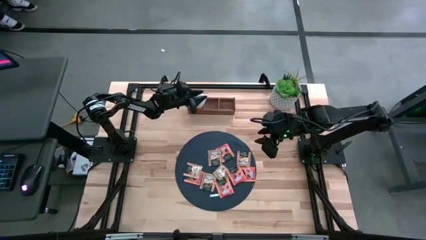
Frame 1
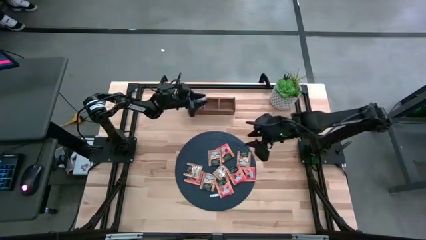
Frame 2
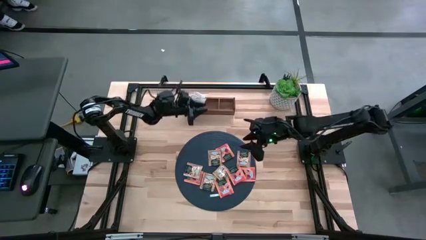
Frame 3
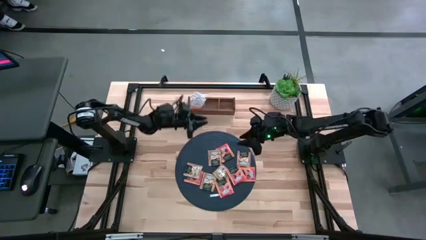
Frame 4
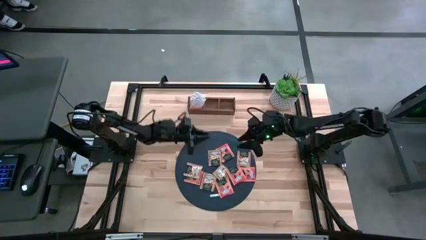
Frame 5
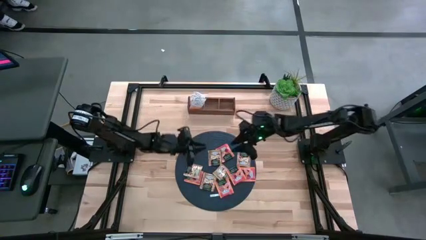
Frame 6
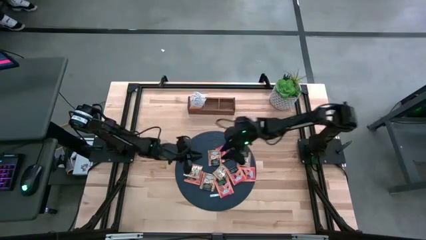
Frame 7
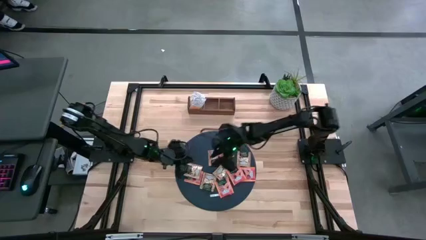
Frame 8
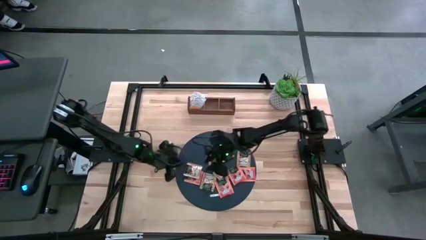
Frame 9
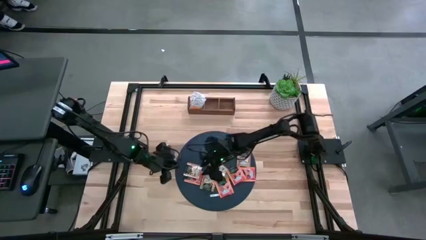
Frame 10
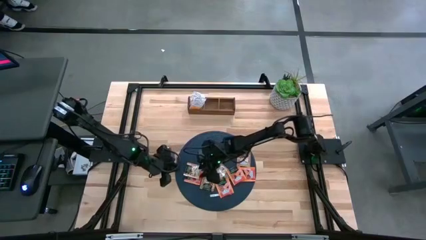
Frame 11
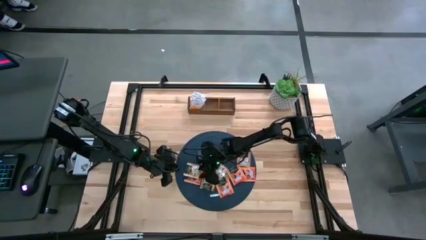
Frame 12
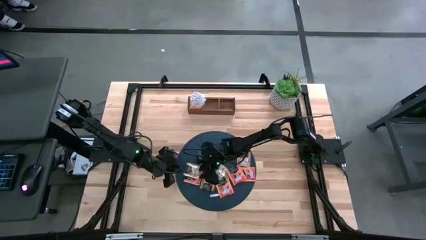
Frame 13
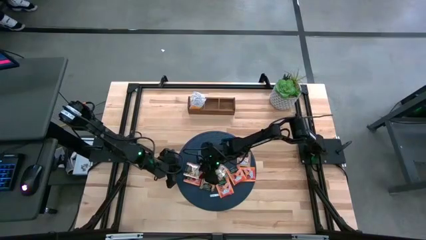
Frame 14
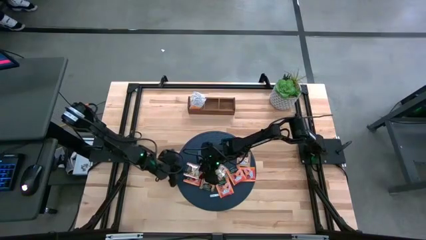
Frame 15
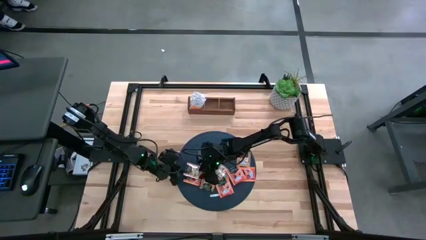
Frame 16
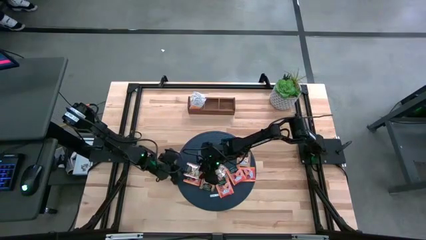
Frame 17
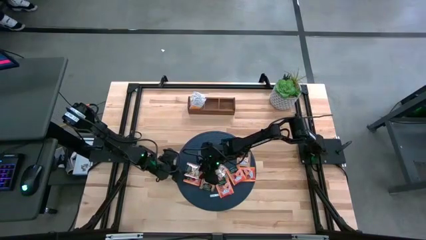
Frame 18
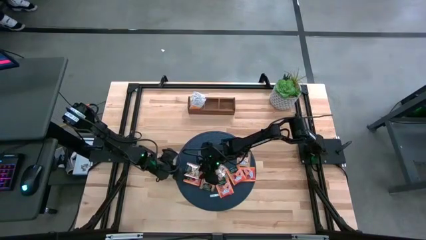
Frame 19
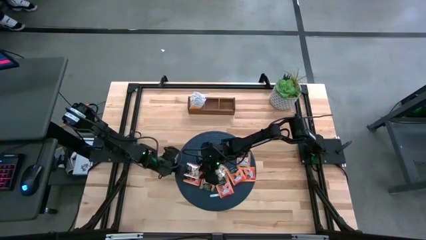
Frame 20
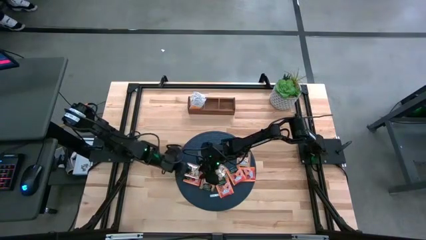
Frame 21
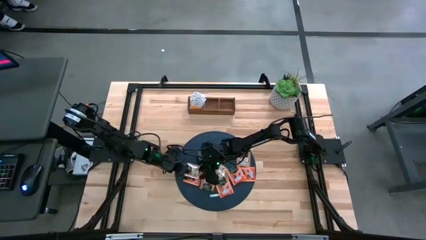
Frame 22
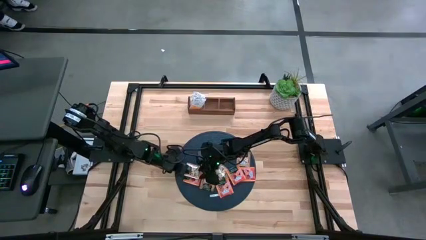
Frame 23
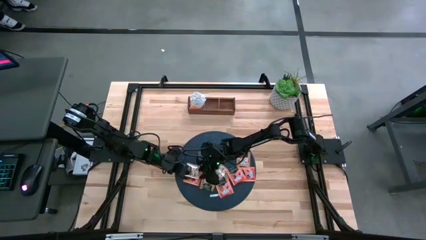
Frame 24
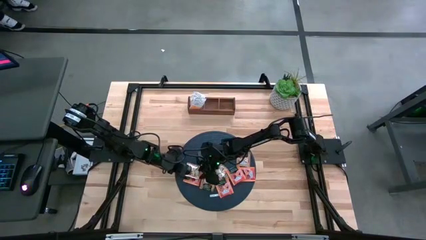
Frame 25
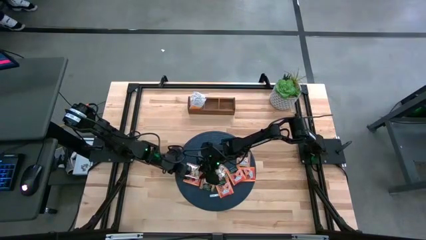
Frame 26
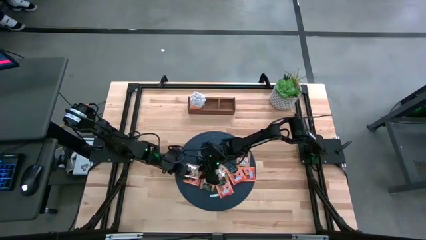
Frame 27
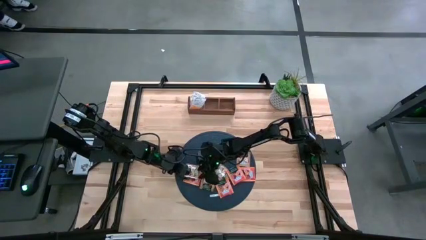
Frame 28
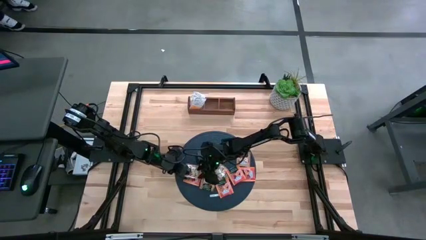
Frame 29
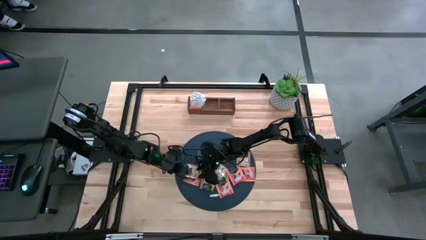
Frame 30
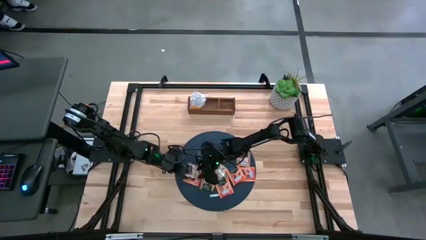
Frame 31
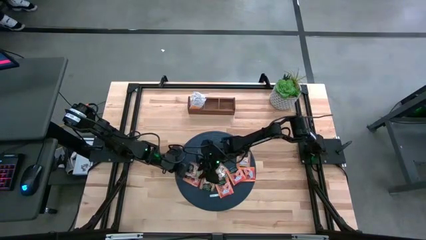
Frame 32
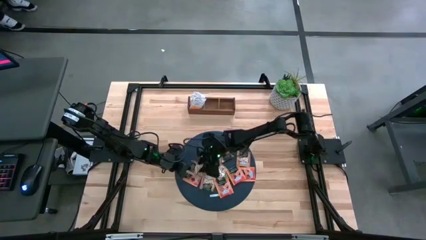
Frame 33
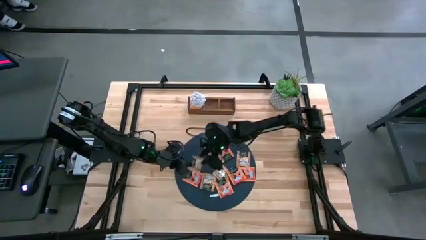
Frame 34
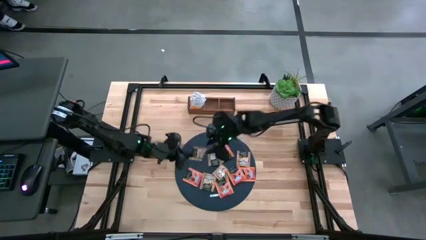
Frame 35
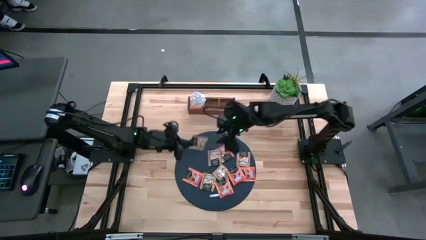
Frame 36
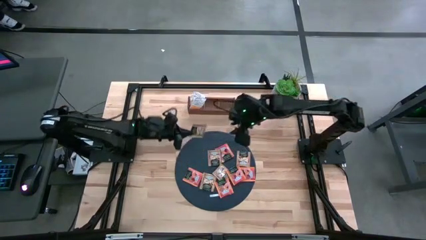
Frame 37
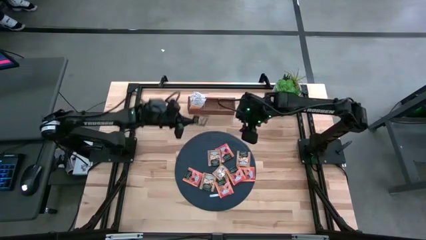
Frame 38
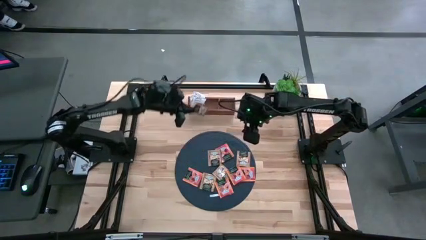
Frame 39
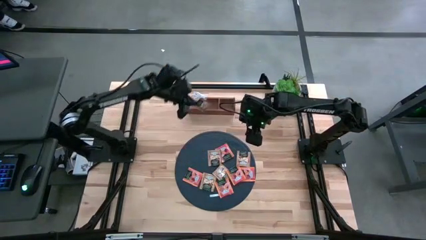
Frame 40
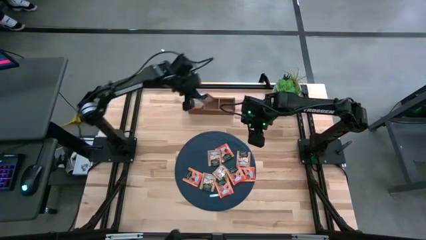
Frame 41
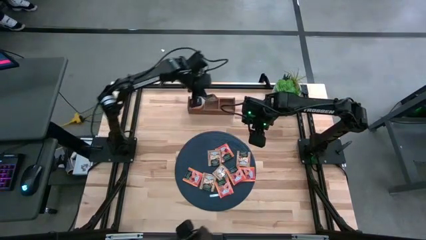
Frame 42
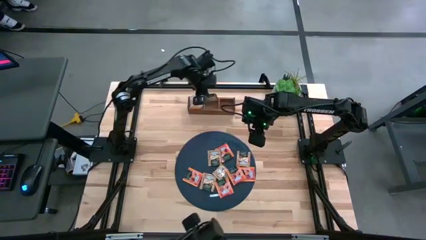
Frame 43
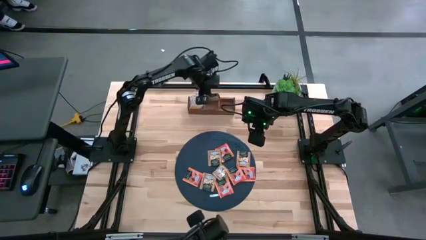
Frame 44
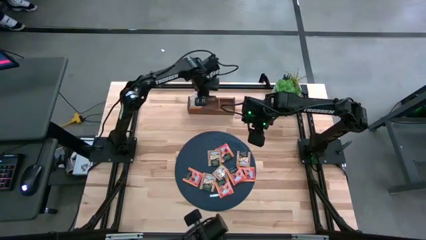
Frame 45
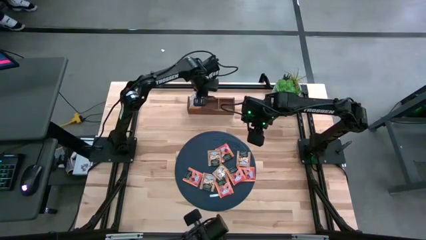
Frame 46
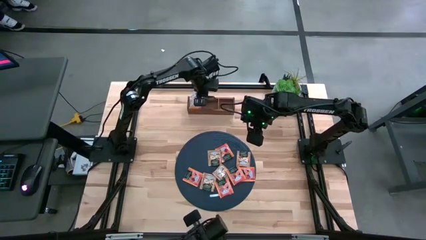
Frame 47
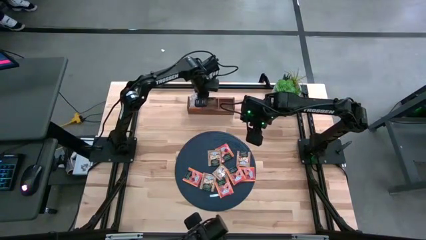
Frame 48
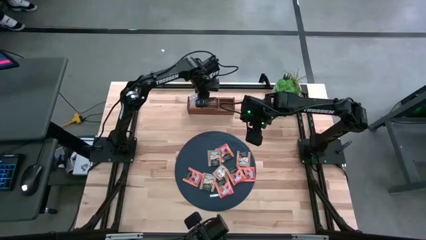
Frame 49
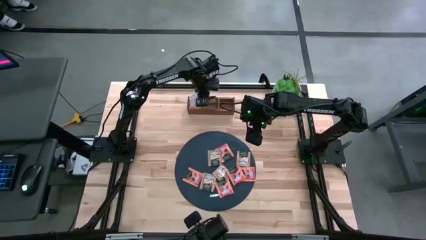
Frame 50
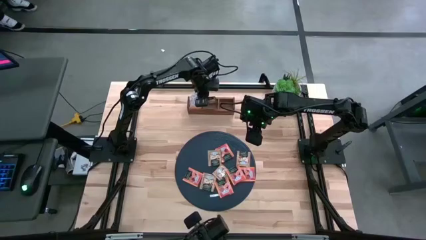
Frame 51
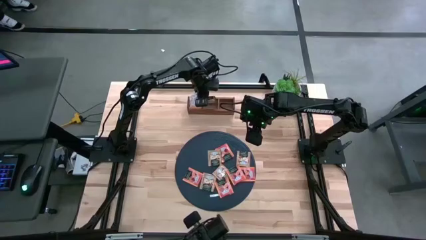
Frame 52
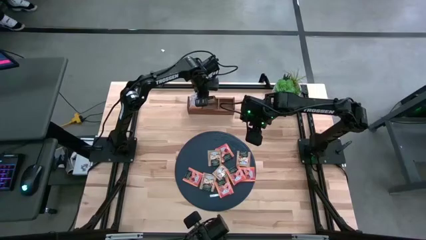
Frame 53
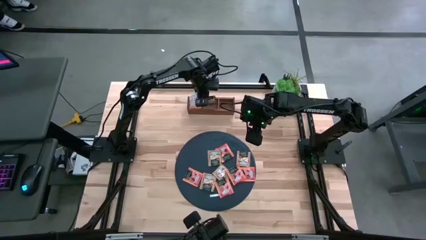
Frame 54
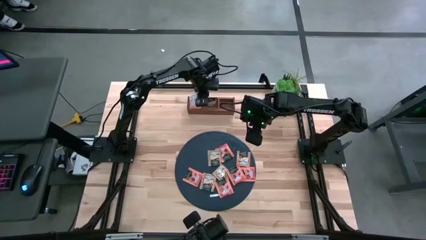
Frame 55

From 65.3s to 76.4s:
Task: Pick & Place Tea
Put the brown tea bag into the middle section of the wooden organizer
